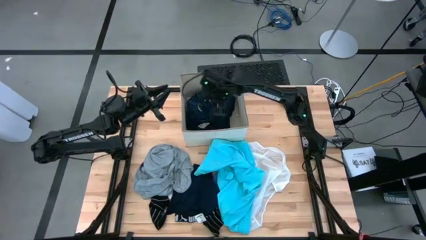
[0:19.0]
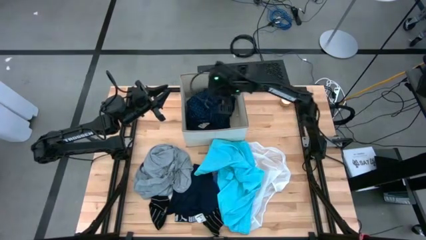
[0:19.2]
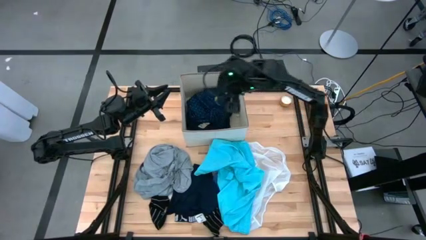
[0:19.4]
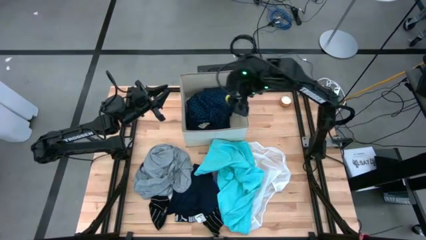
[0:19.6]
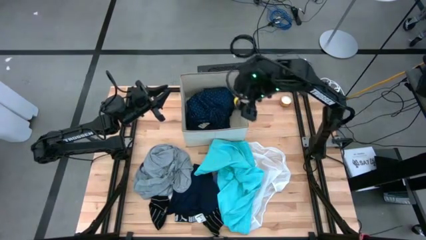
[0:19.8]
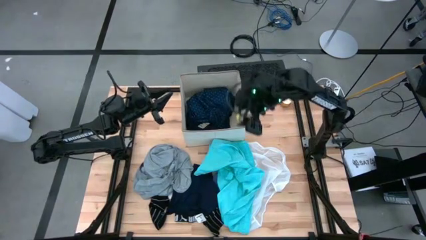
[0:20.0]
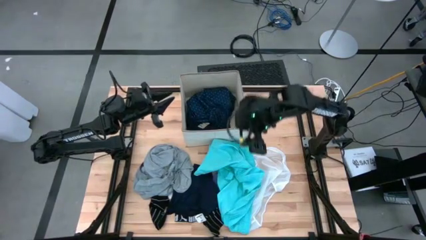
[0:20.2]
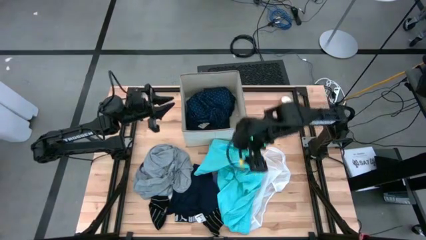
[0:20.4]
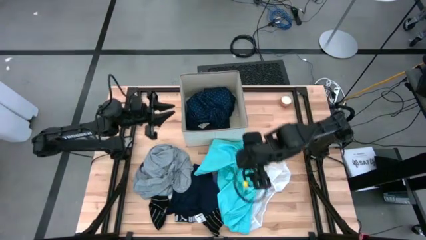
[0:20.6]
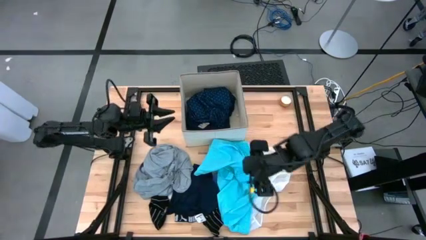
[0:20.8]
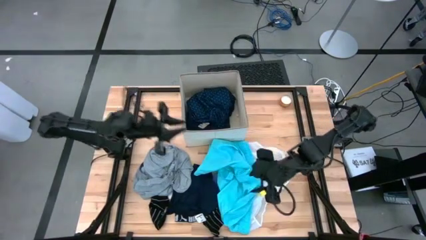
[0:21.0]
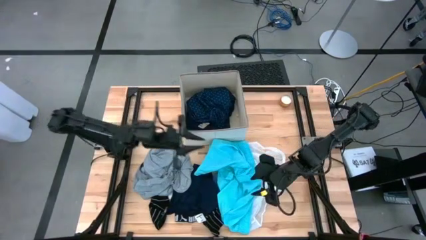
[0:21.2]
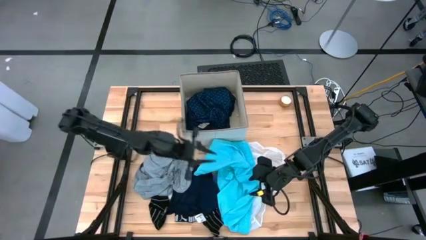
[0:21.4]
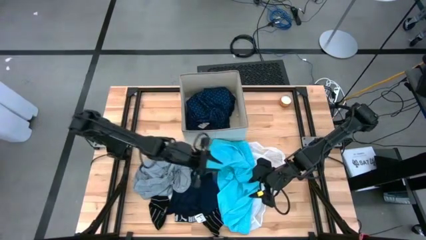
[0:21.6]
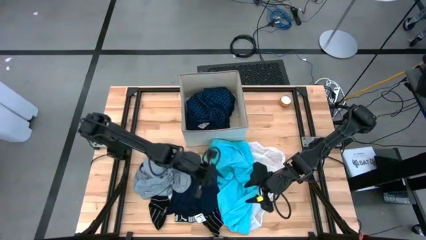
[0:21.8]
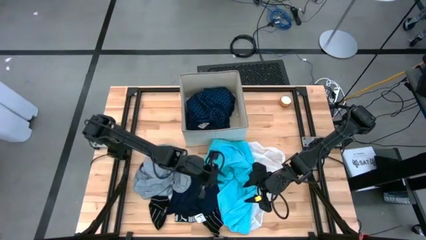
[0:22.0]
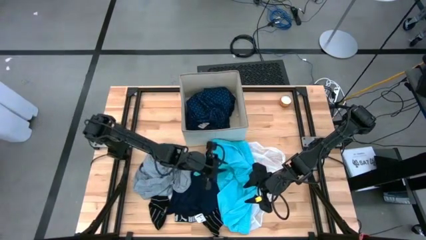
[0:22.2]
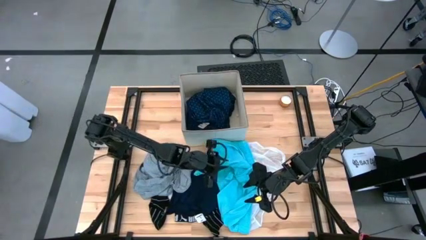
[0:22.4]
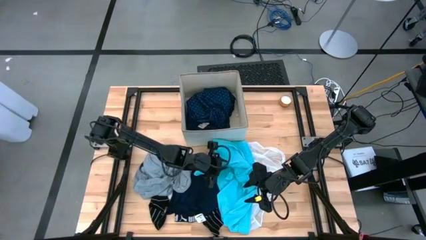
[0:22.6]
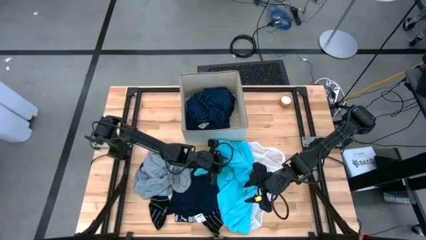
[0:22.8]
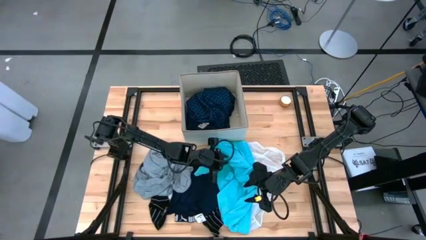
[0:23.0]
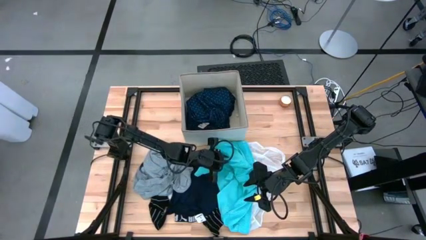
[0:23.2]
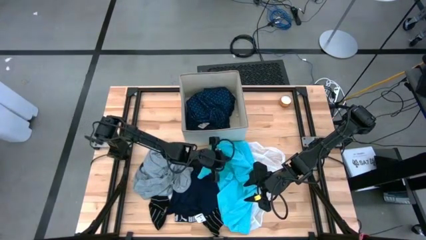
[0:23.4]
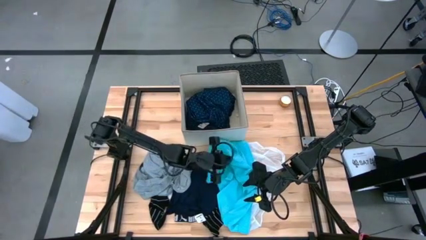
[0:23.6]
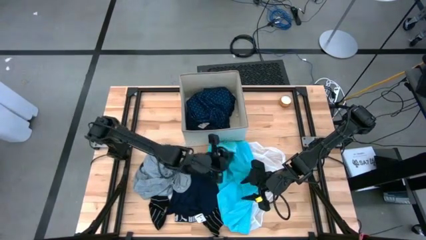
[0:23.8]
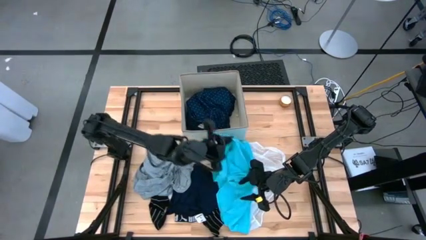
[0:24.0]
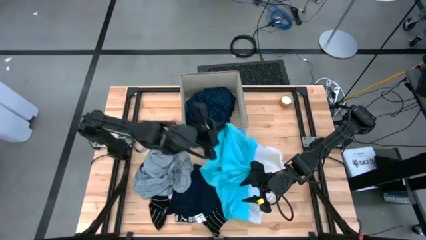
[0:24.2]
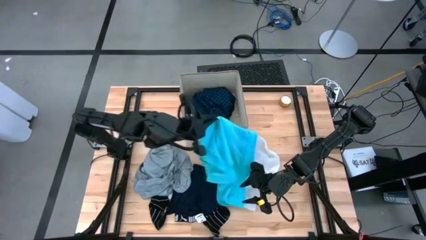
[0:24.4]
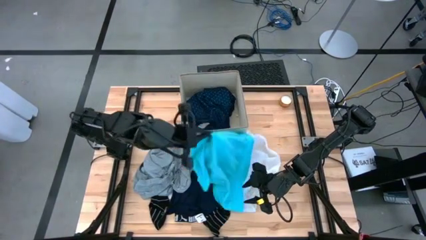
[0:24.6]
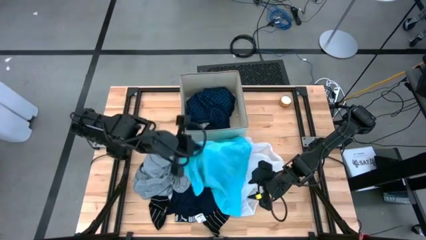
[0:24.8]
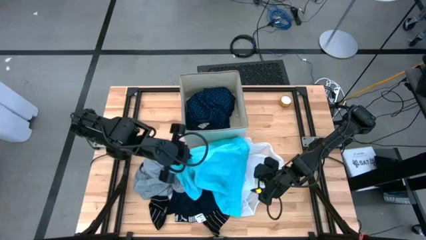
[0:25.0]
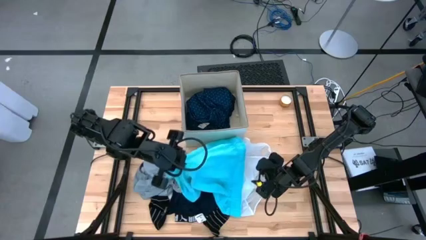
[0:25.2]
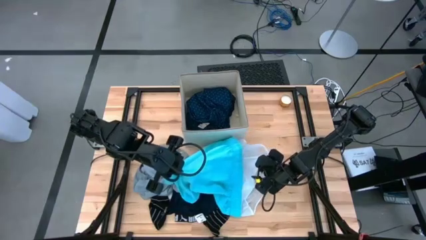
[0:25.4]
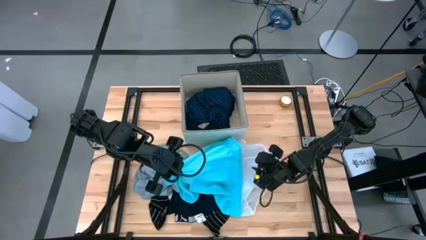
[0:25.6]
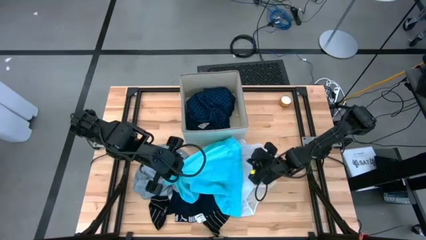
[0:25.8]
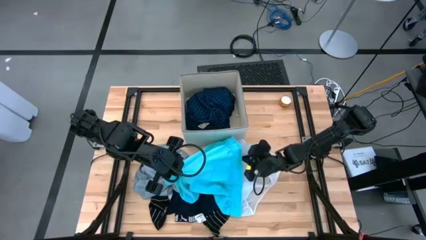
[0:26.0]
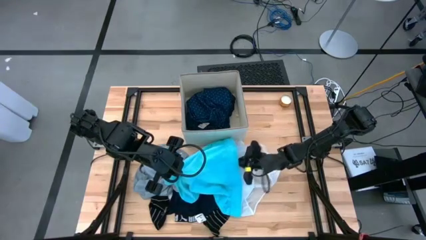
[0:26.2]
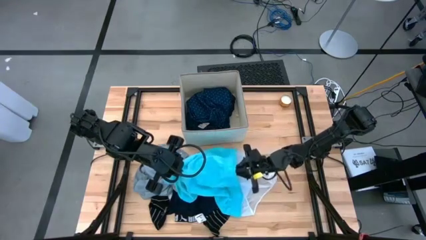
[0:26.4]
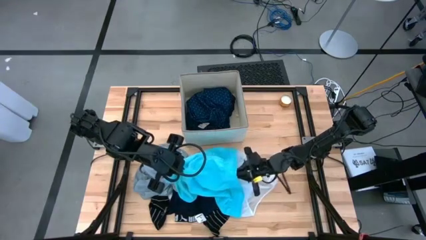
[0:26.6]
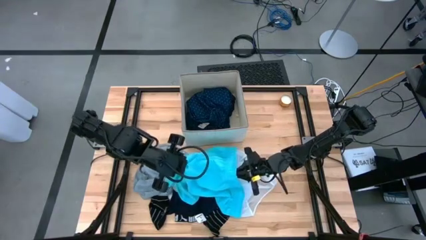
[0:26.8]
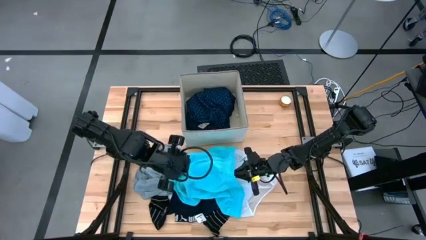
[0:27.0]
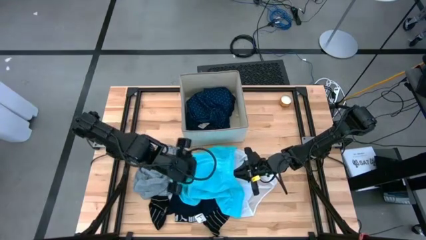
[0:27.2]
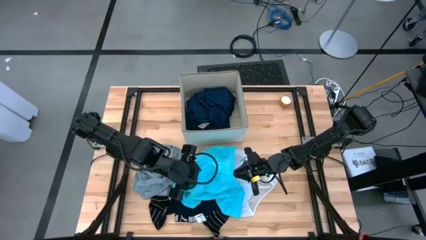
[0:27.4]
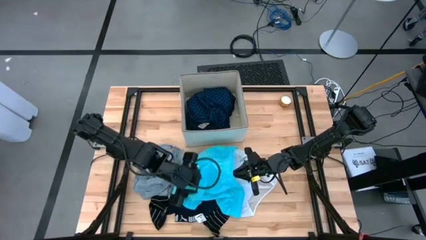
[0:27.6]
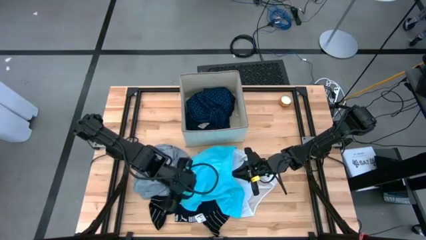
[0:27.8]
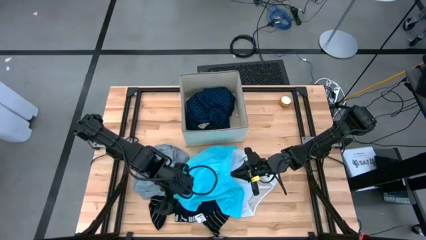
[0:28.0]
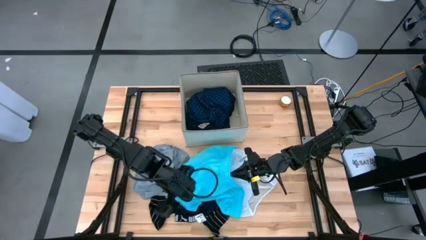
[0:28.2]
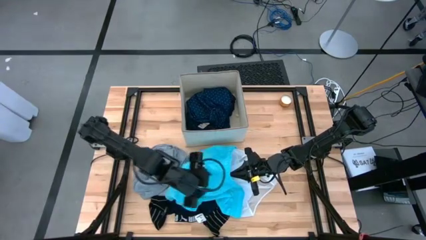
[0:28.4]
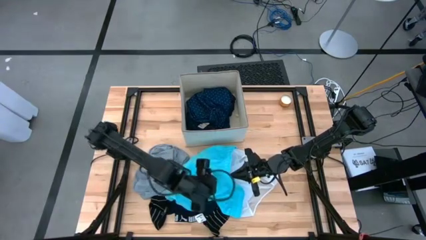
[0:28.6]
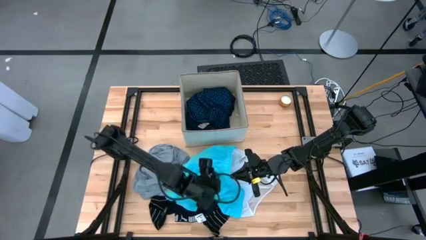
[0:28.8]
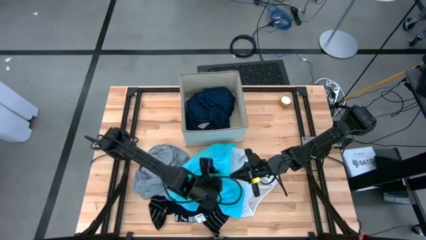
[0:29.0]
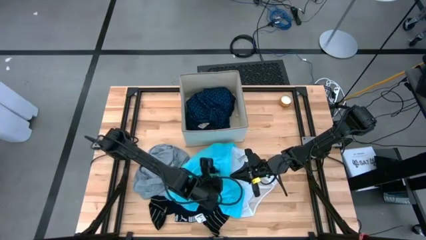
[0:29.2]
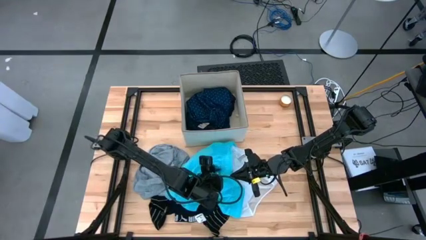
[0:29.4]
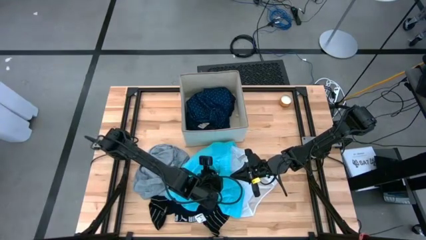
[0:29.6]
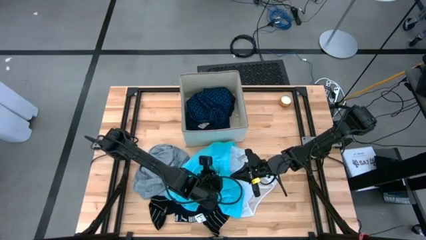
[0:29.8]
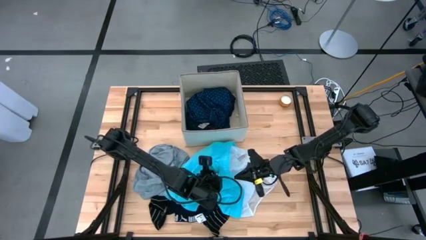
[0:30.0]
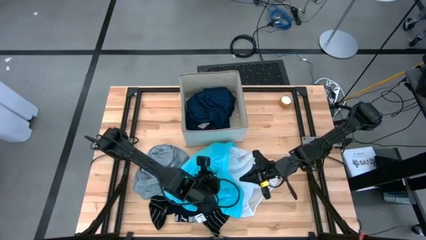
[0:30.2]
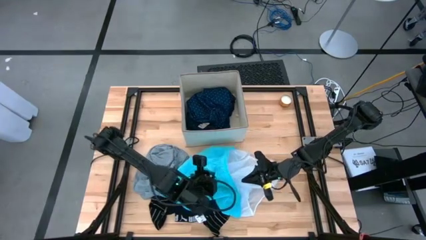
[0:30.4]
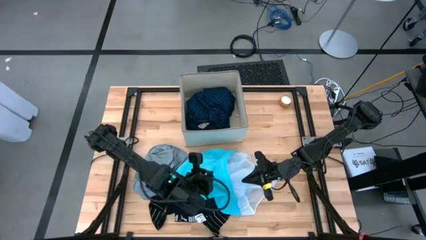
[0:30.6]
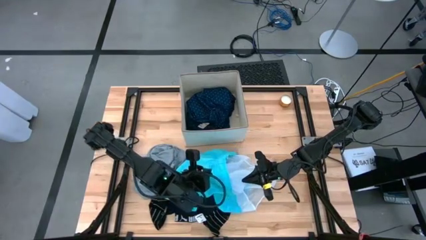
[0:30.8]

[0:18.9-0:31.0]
Task: Sort clothes
Put the light blue shorts into the laundry bin

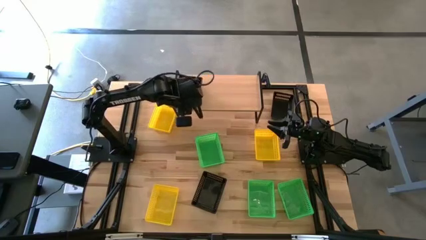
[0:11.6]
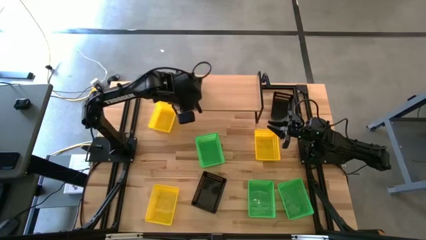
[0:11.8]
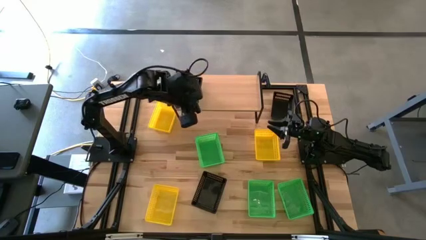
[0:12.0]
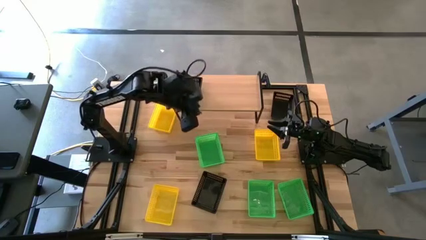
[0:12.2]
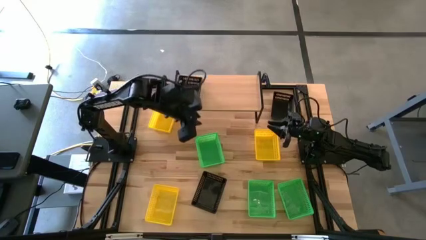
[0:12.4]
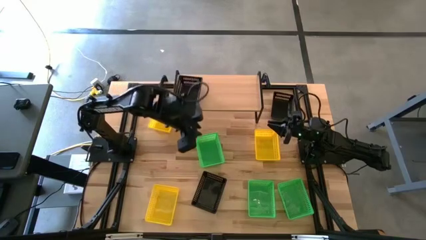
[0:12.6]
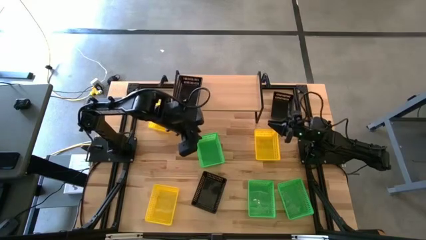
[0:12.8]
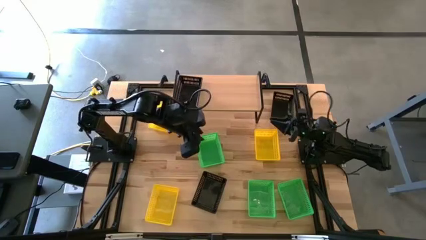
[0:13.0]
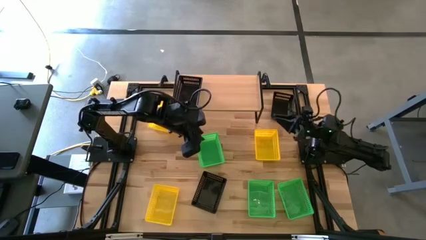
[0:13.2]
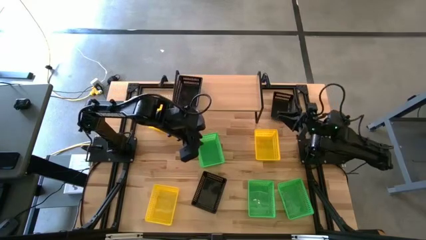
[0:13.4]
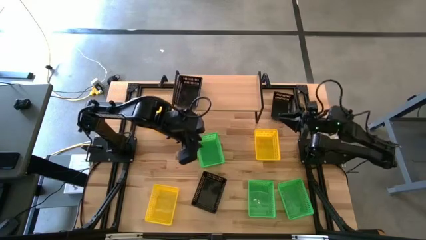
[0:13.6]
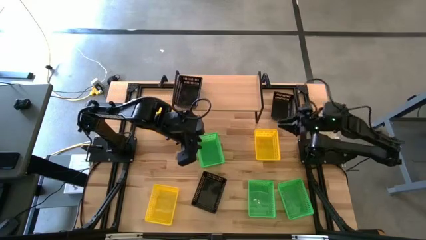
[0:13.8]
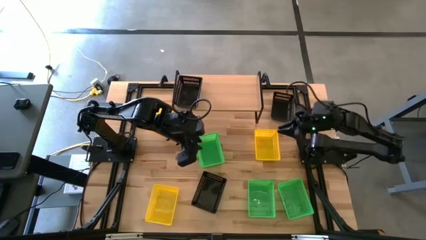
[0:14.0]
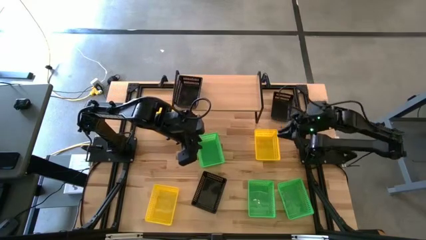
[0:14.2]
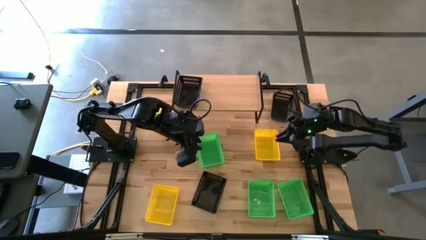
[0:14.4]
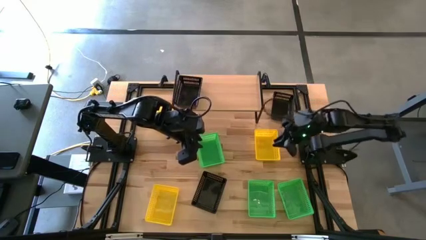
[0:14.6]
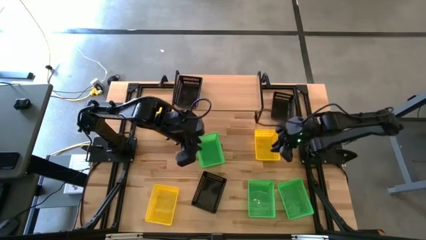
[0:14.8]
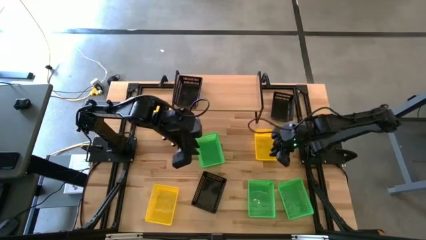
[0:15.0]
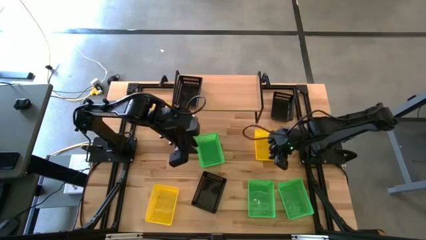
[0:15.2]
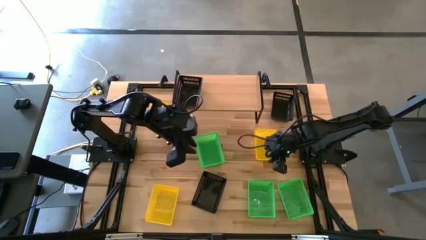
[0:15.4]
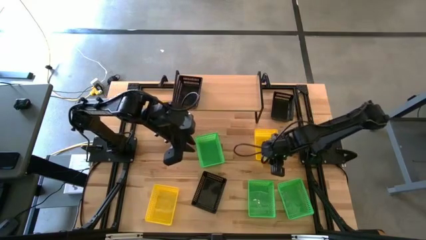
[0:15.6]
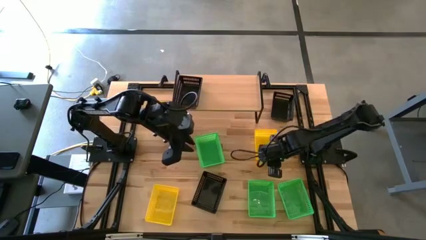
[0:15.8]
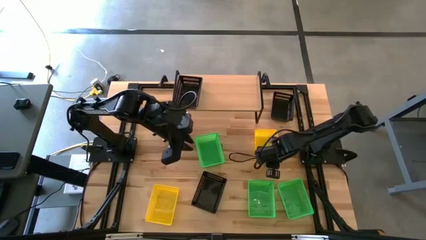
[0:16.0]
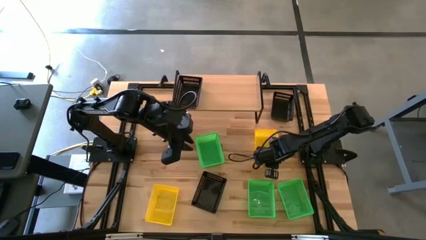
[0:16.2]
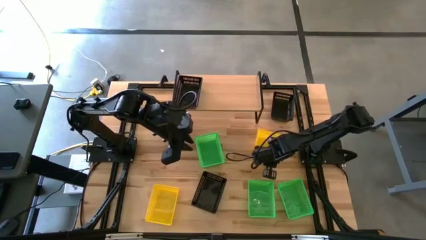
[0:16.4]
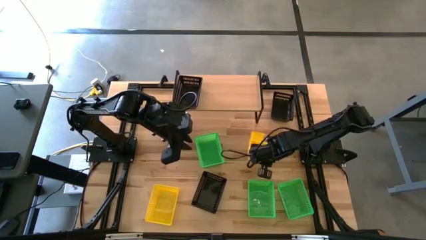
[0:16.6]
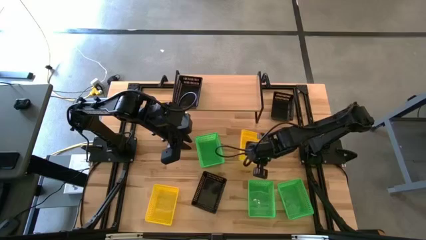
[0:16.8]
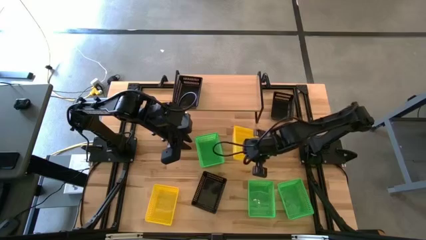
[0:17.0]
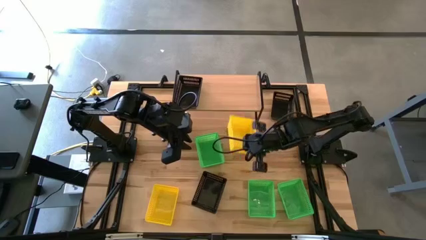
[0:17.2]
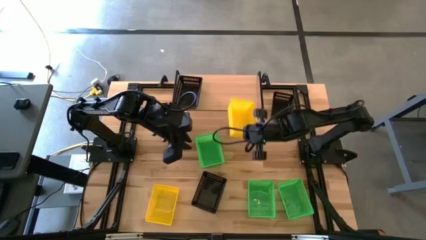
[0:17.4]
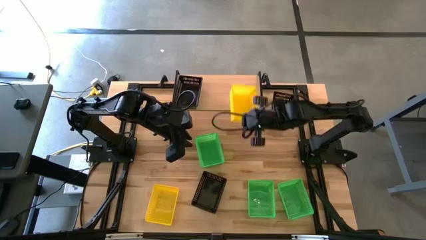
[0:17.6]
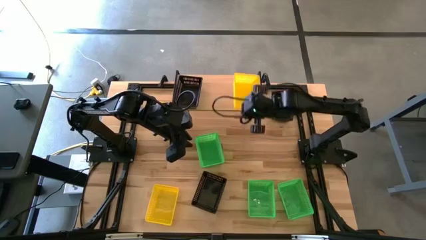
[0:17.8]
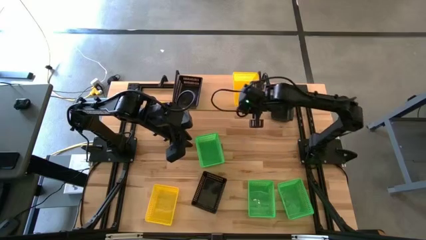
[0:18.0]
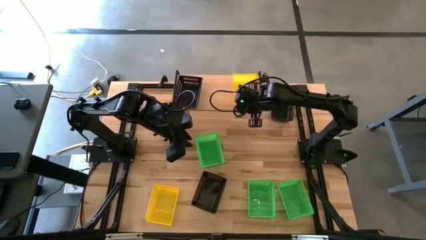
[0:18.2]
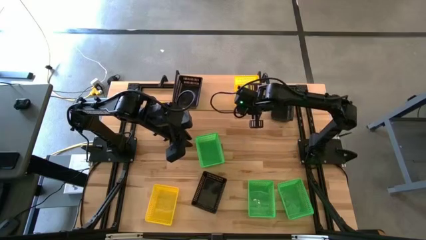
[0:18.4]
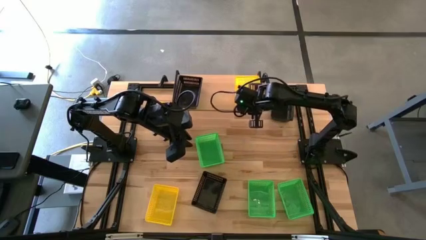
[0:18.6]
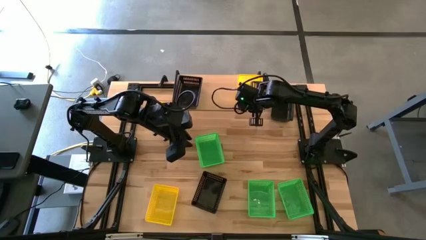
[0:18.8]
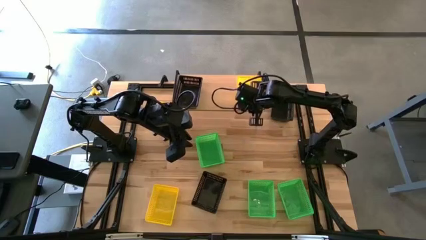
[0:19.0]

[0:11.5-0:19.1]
Task: Stack baskets on shelf by color
Put the middle-right yellow bin on the shelf
